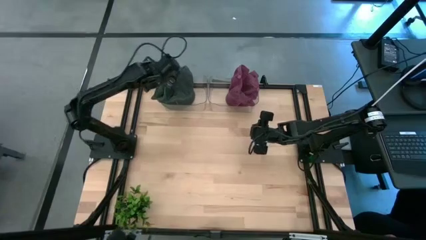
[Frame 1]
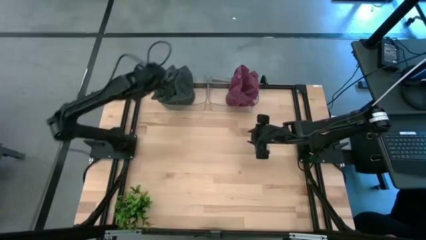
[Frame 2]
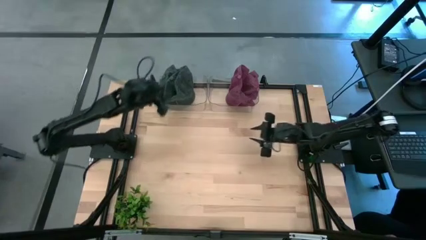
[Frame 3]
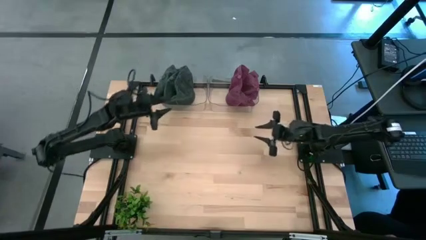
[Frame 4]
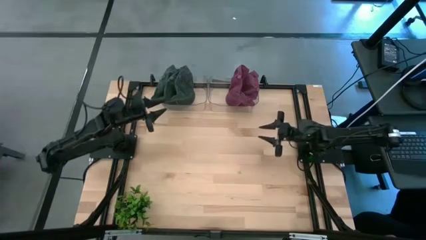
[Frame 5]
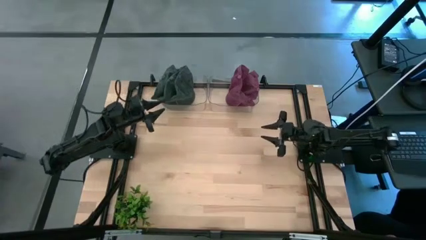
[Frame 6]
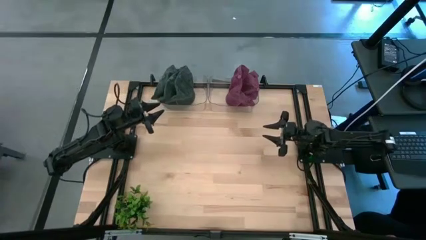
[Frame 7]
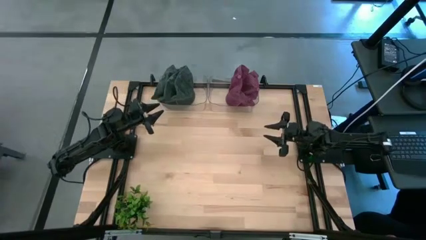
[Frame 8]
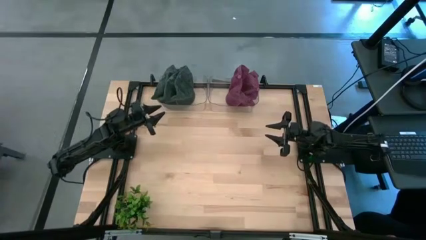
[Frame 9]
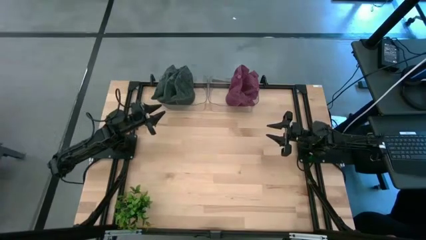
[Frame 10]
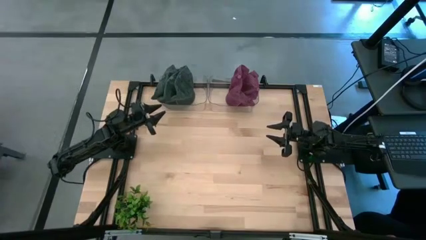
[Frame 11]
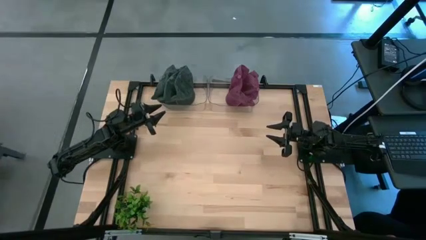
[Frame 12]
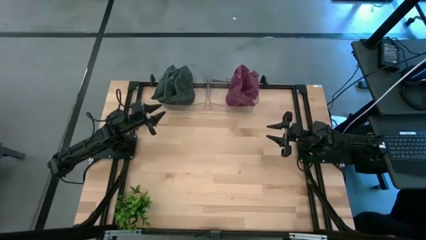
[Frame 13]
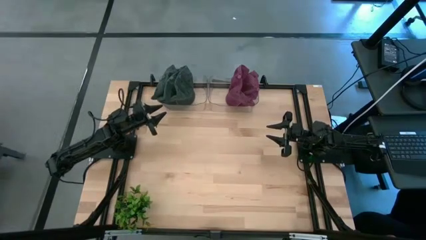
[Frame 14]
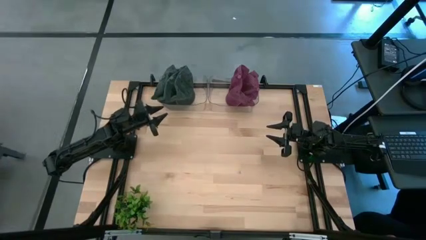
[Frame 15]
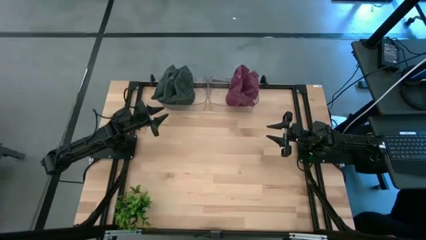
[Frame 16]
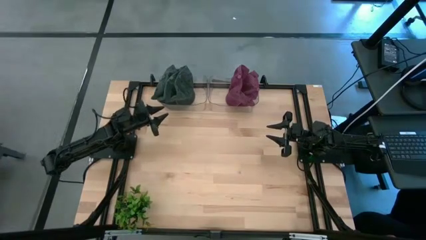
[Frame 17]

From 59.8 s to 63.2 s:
Task: Pick & Place hat
Return to Home Position

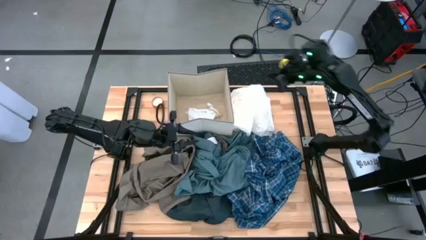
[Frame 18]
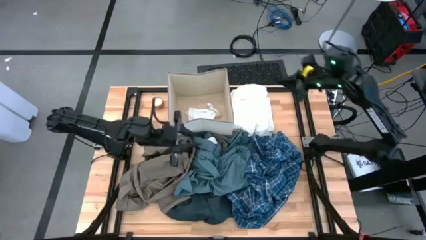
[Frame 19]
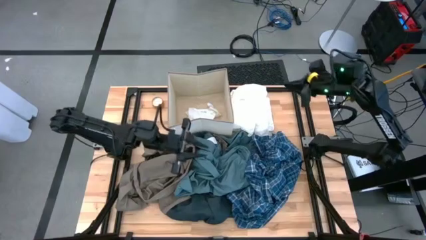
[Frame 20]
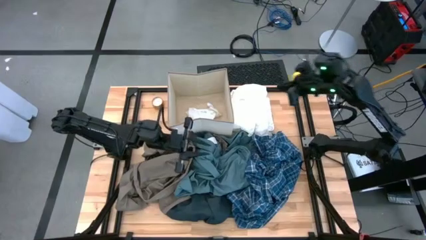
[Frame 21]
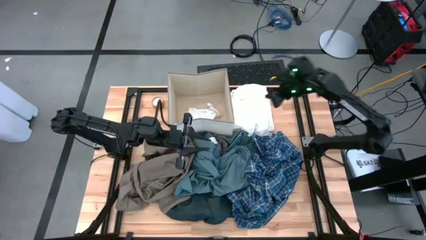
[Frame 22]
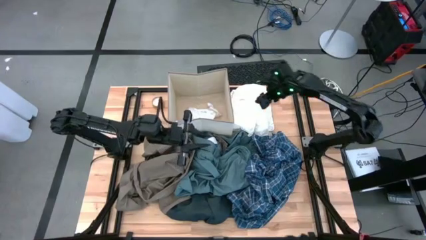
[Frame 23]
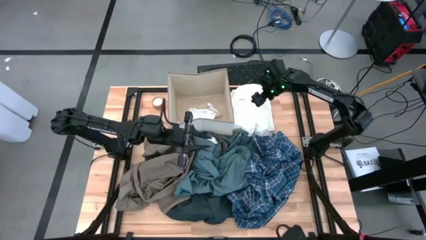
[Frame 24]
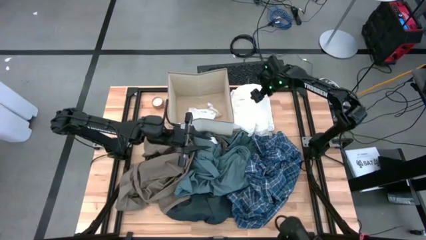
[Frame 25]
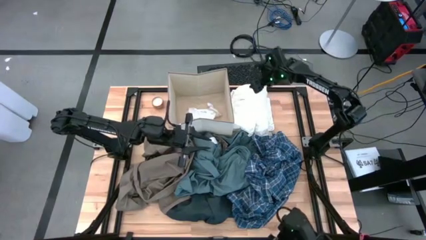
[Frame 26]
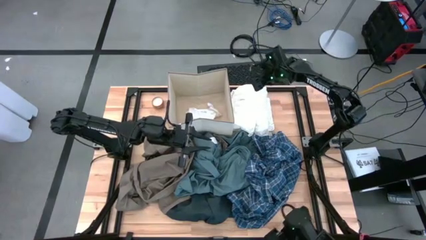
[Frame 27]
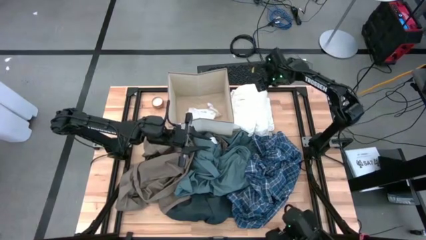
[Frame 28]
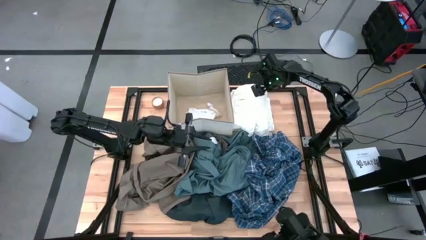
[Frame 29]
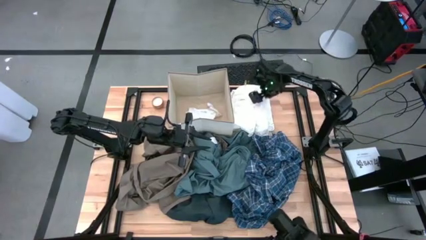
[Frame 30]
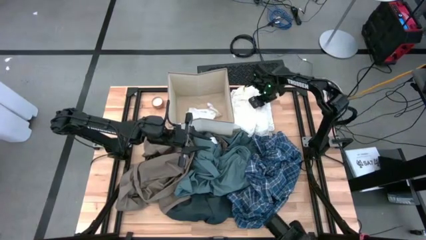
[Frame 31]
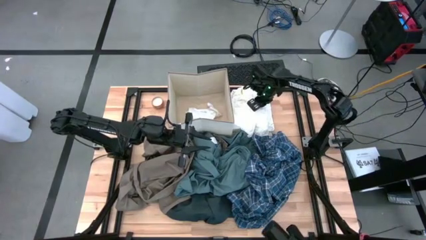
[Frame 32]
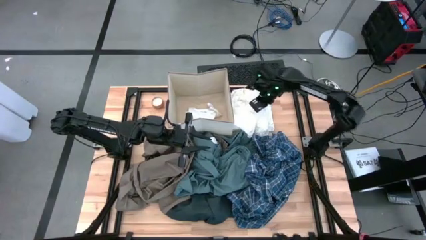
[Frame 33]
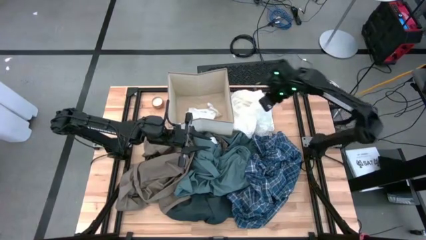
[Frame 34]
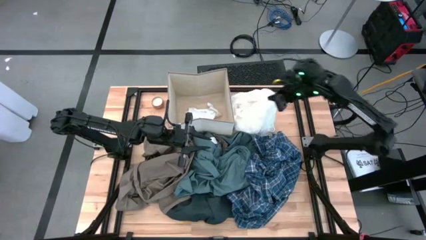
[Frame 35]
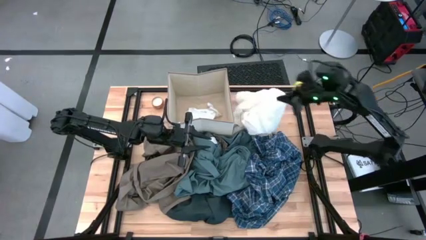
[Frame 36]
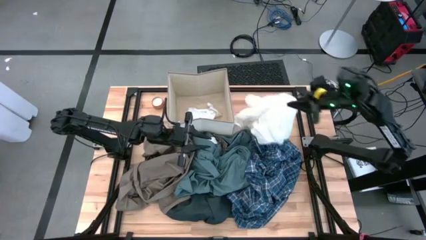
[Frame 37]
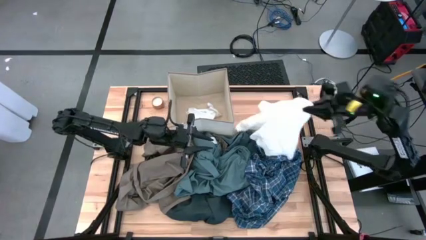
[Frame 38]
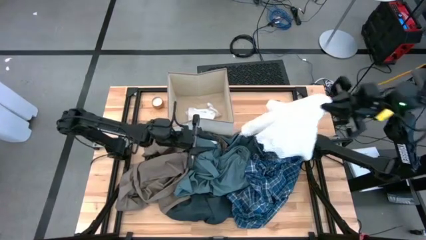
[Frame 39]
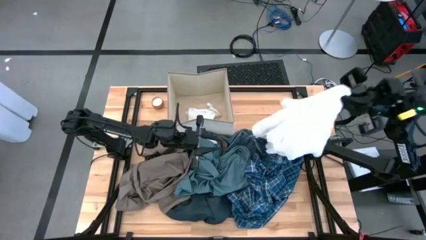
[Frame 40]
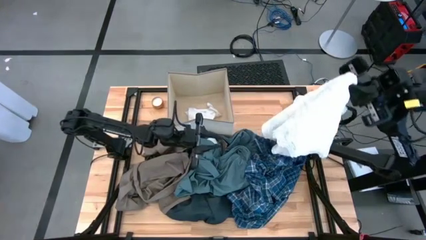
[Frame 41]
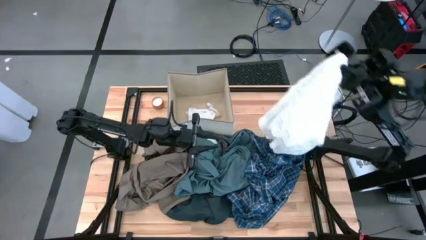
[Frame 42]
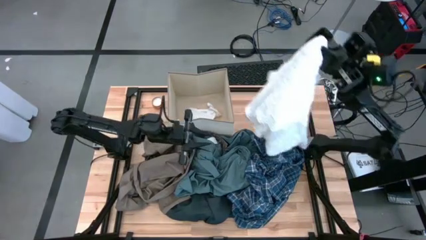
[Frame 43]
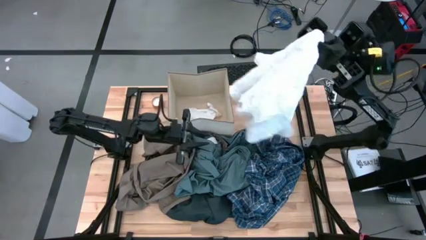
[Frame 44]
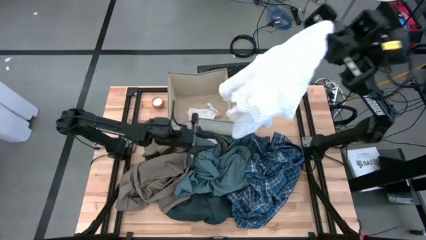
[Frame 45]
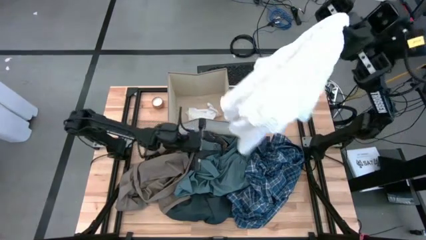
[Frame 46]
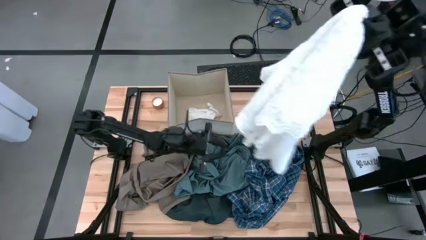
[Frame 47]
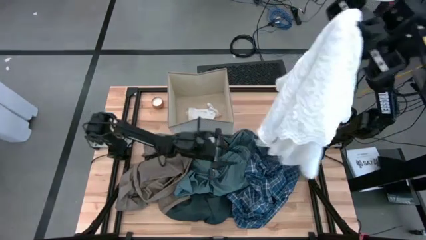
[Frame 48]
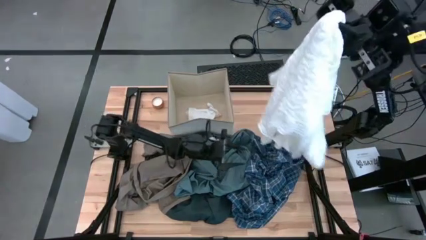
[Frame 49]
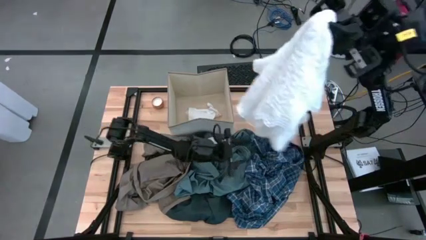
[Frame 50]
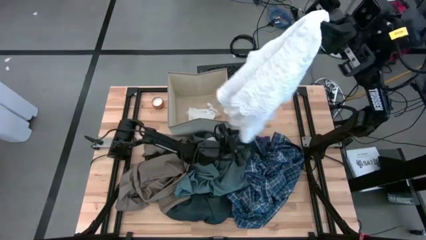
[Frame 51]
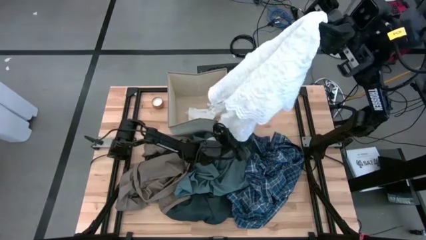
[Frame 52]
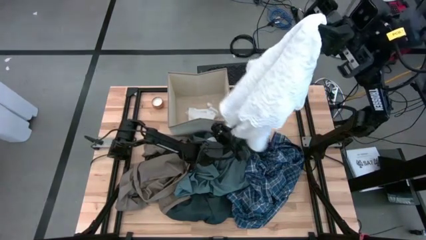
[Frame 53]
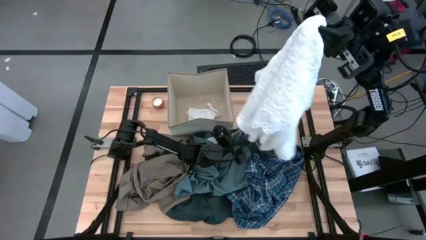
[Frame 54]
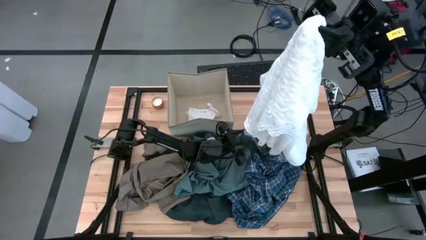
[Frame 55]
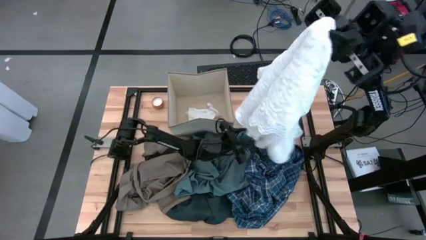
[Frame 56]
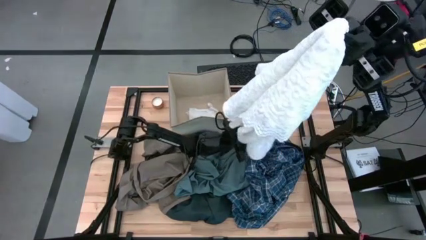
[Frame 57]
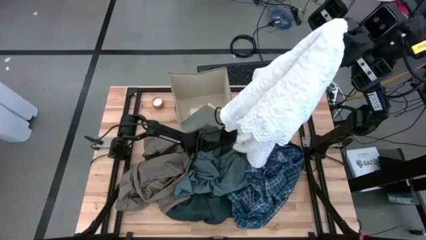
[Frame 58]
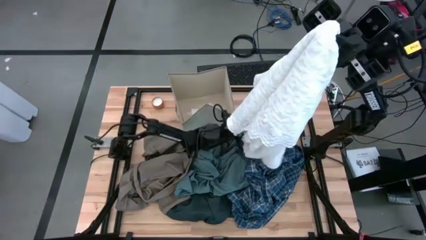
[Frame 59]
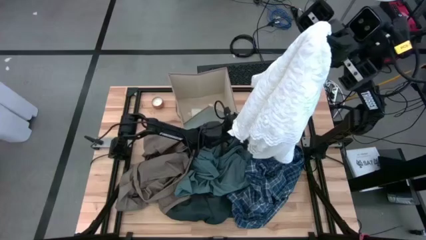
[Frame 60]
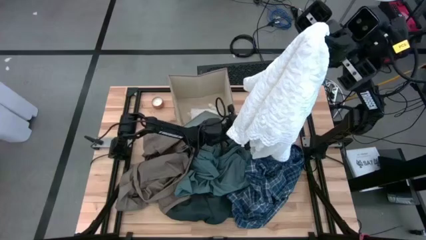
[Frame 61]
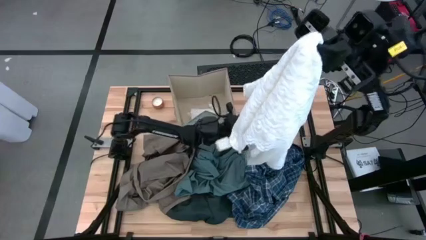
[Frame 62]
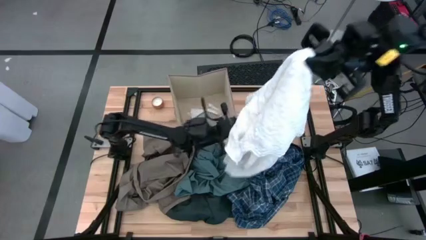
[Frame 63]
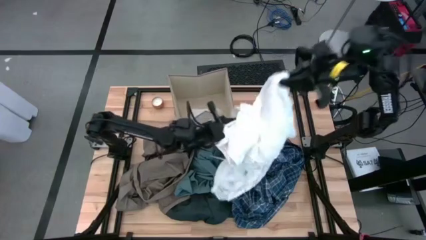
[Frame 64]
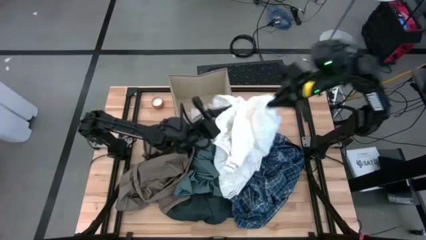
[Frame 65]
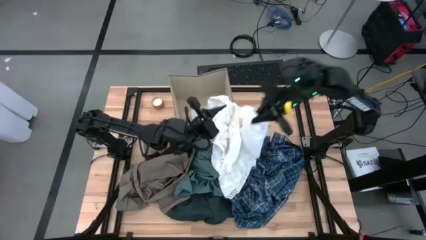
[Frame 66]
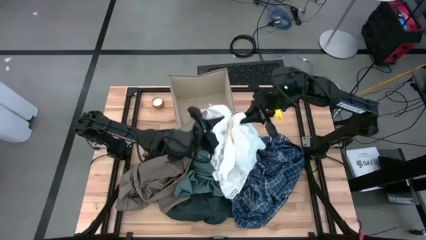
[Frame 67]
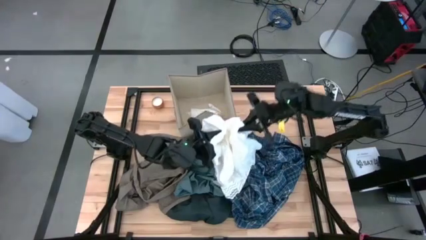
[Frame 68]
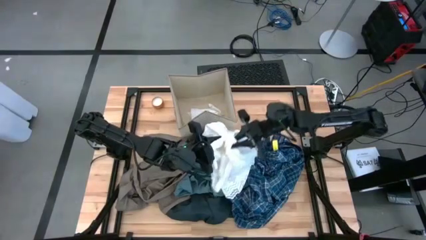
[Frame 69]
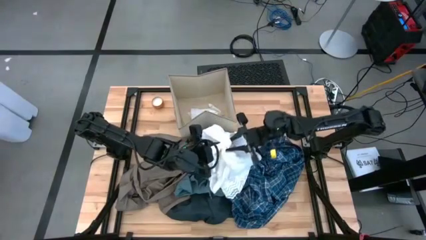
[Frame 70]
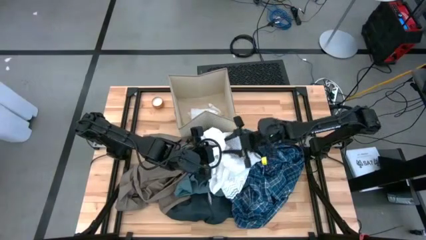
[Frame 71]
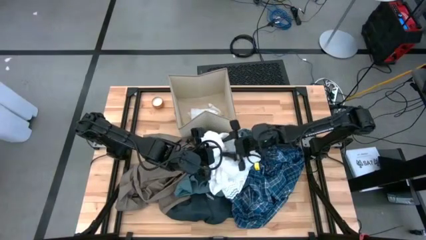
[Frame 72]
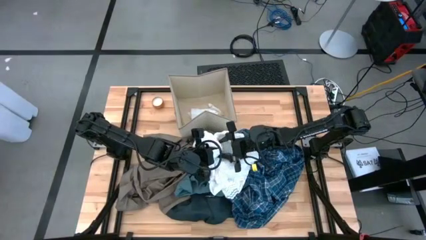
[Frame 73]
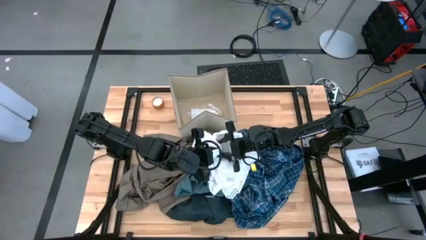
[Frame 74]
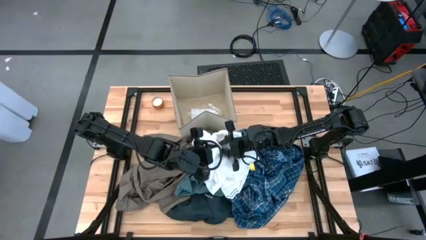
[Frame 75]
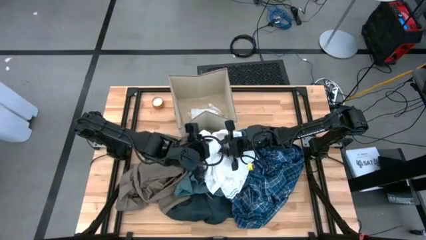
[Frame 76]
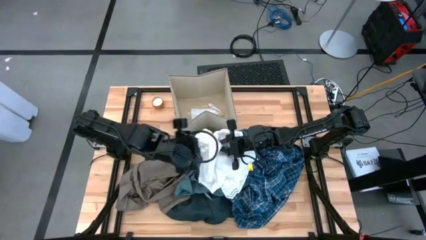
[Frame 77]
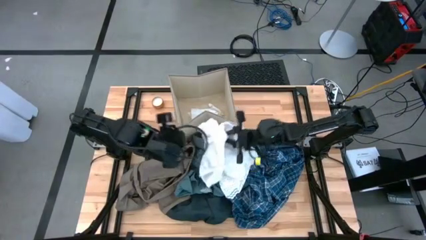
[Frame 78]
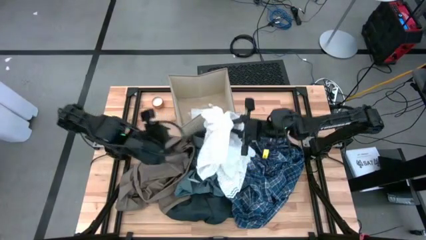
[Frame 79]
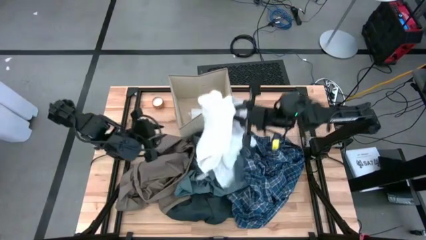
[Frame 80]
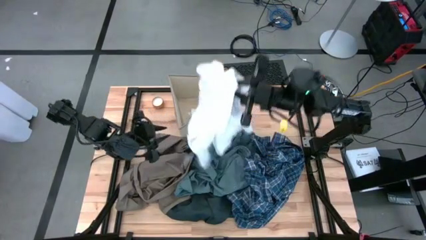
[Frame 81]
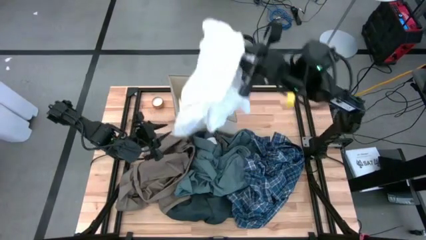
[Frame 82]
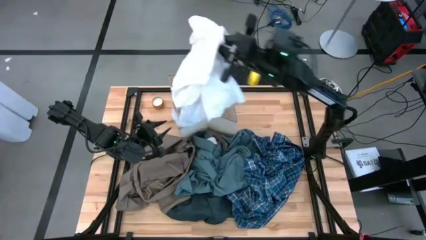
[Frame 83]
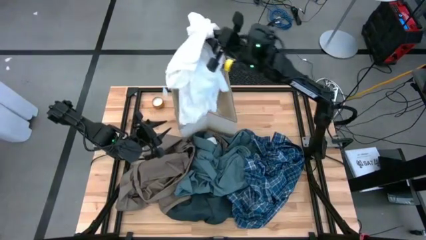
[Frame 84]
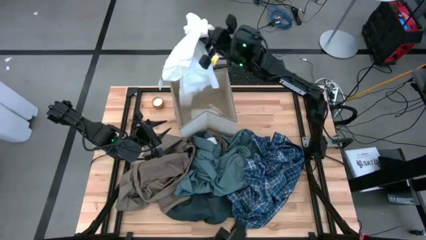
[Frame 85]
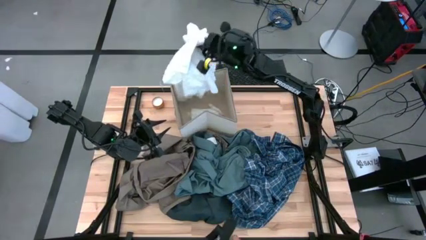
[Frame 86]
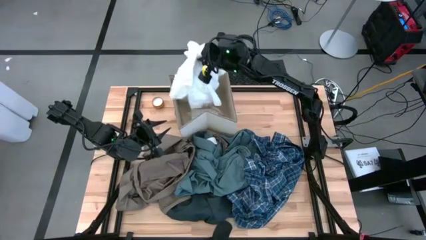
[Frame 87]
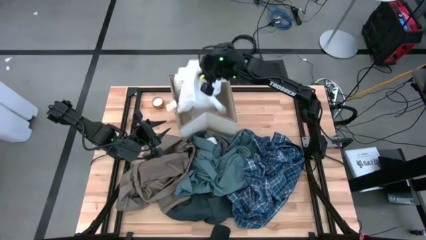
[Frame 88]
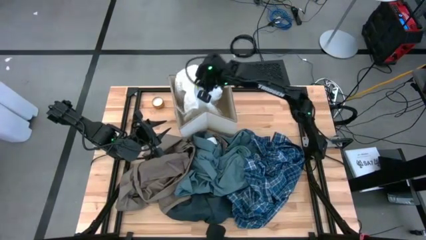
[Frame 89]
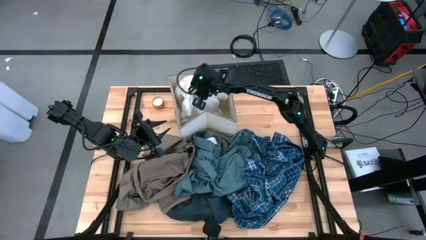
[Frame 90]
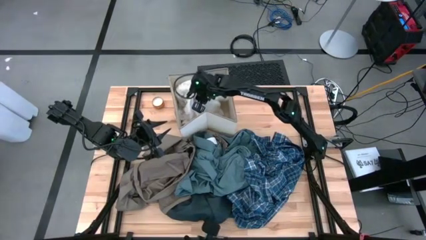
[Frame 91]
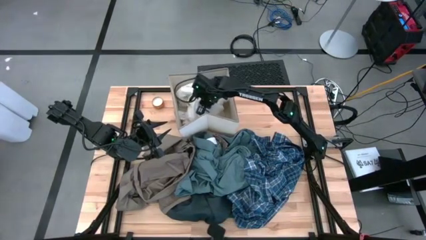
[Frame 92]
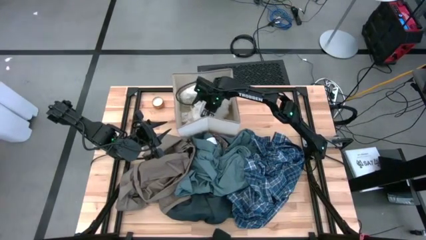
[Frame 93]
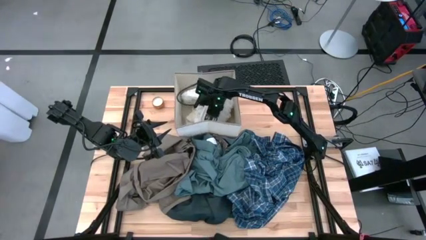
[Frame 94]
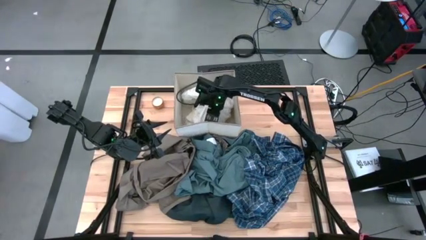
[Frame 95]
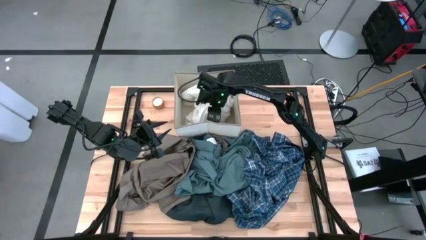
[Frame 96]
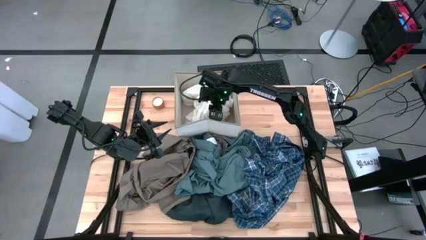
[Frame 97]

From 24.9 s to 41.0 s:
Task: Sort clothes
Put the white shirt into the laundry bin
